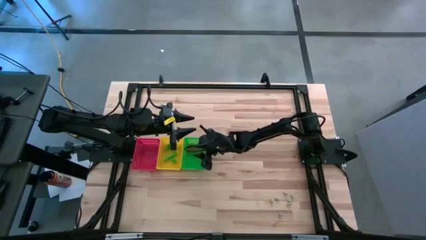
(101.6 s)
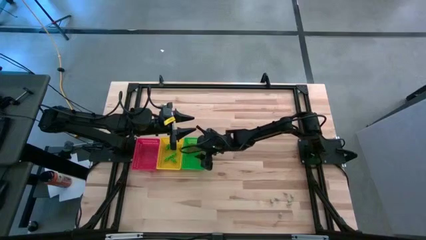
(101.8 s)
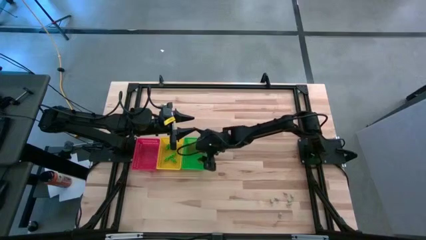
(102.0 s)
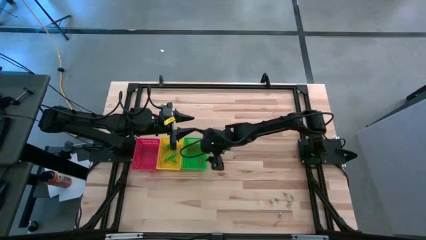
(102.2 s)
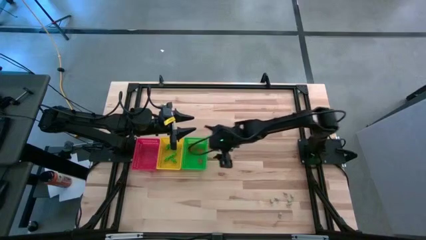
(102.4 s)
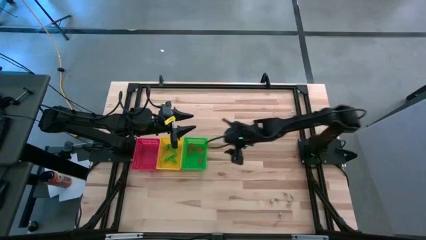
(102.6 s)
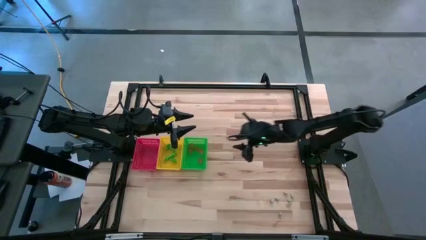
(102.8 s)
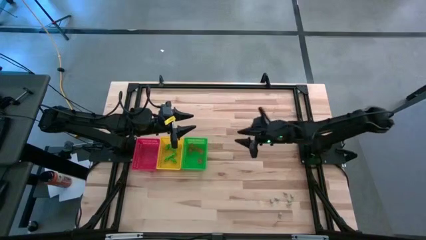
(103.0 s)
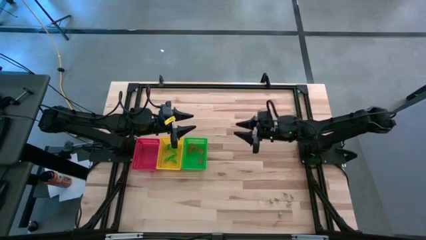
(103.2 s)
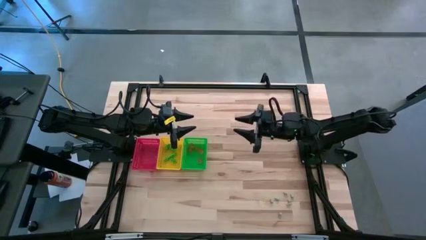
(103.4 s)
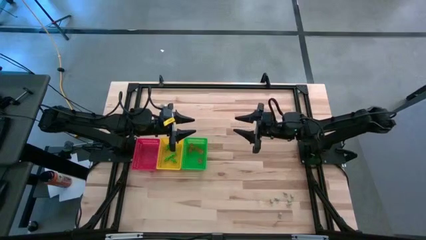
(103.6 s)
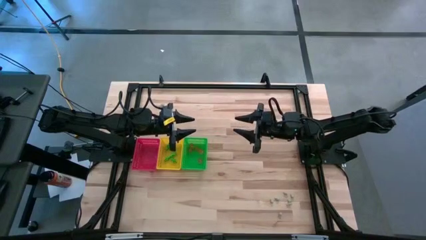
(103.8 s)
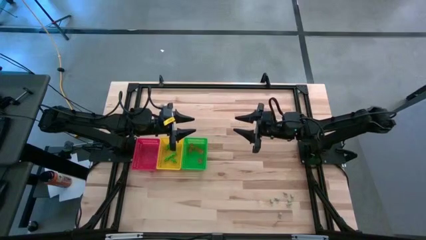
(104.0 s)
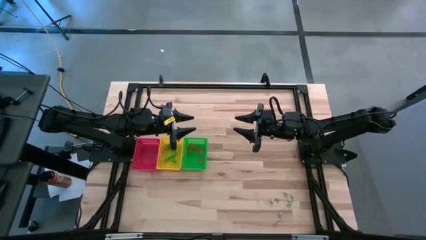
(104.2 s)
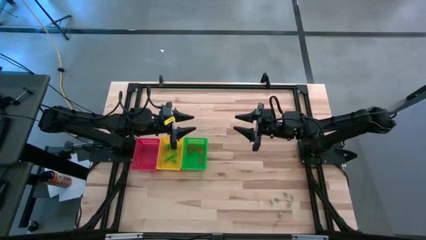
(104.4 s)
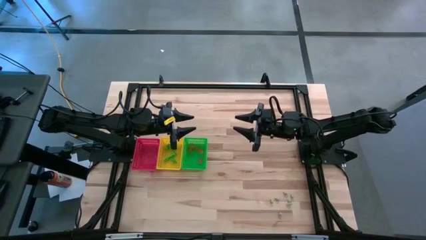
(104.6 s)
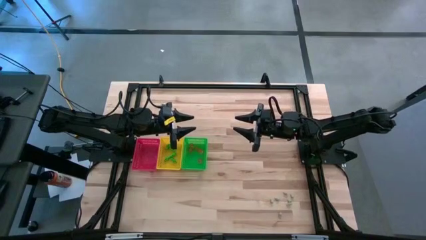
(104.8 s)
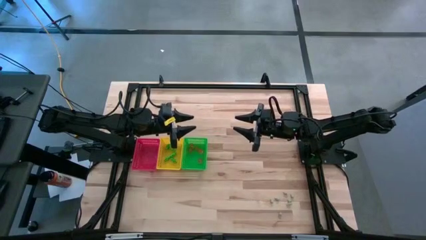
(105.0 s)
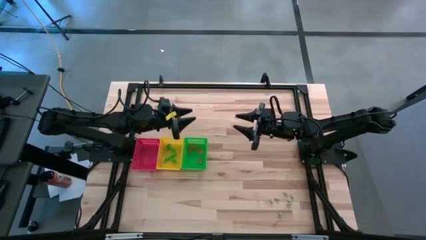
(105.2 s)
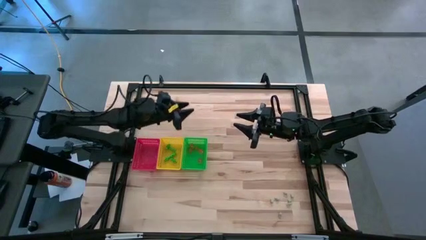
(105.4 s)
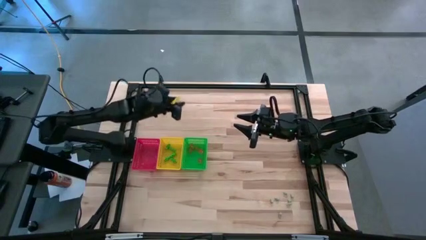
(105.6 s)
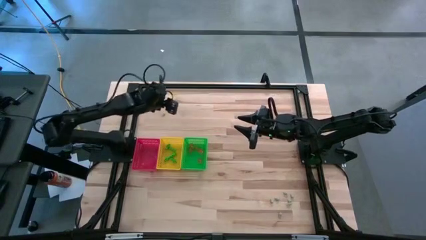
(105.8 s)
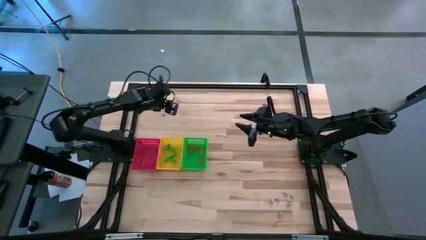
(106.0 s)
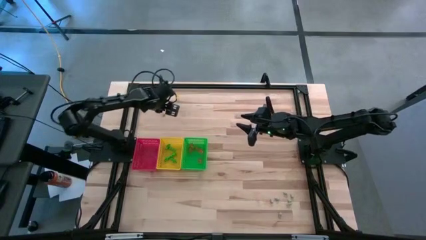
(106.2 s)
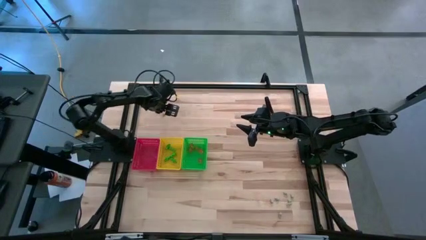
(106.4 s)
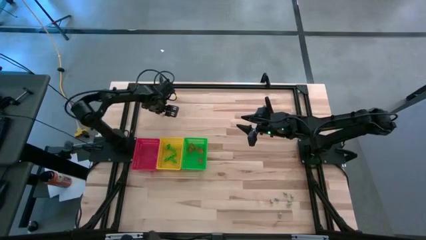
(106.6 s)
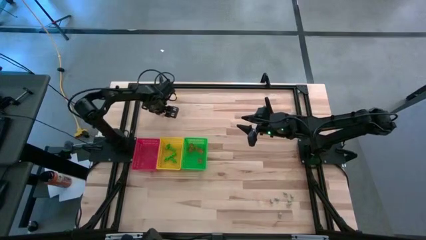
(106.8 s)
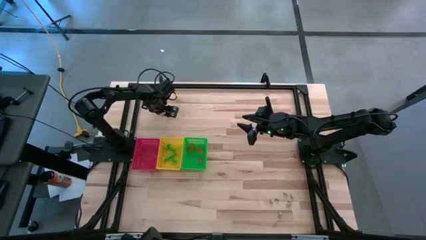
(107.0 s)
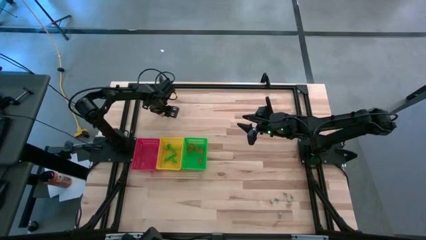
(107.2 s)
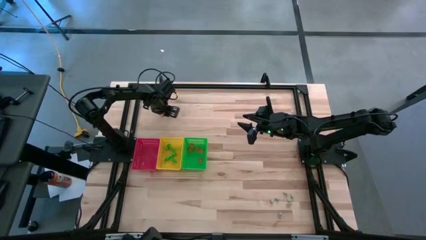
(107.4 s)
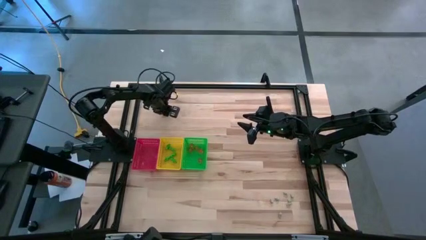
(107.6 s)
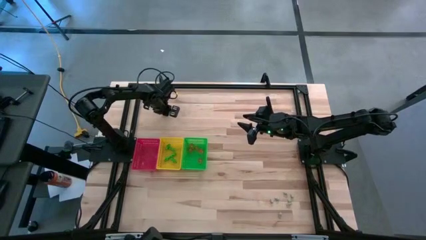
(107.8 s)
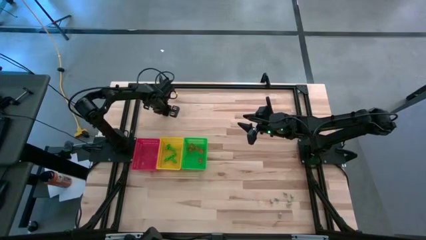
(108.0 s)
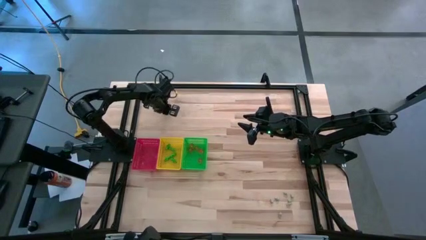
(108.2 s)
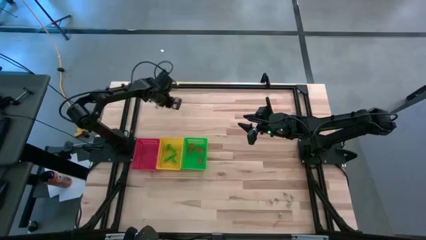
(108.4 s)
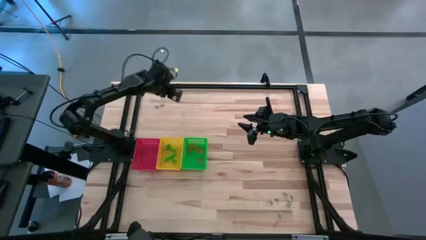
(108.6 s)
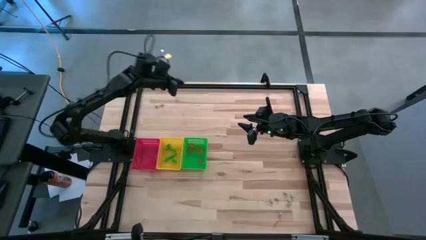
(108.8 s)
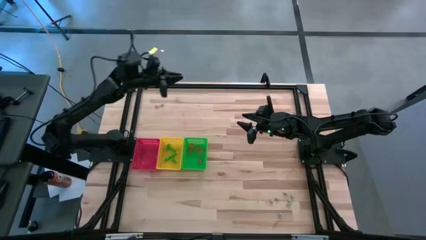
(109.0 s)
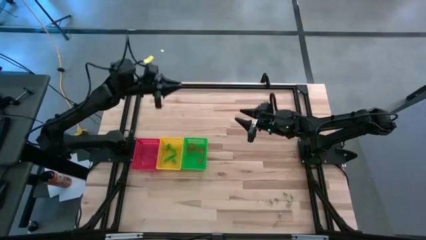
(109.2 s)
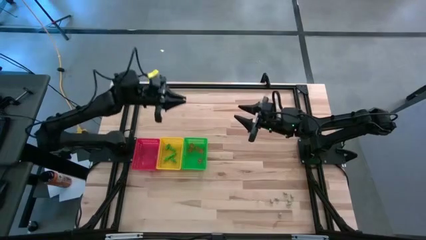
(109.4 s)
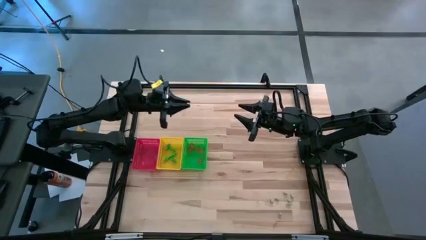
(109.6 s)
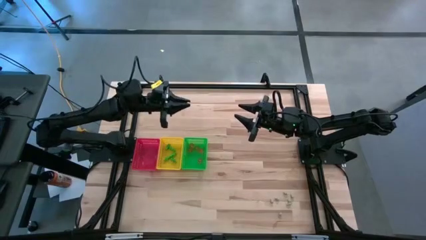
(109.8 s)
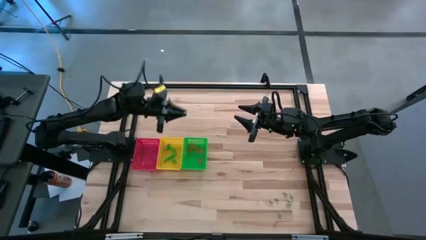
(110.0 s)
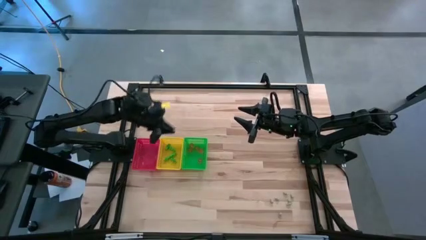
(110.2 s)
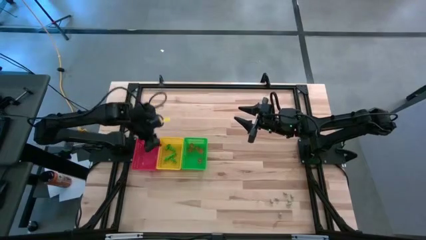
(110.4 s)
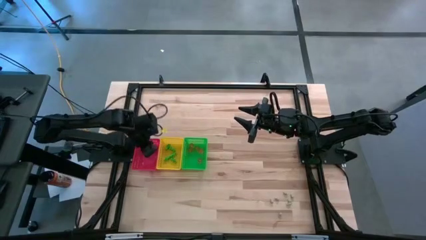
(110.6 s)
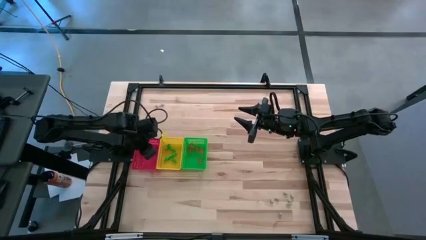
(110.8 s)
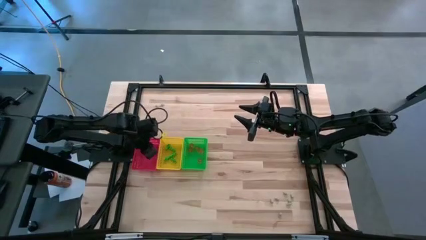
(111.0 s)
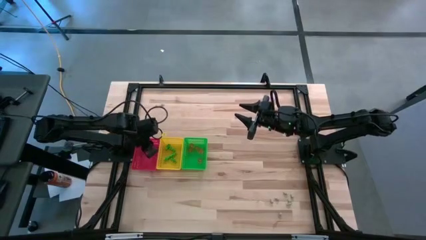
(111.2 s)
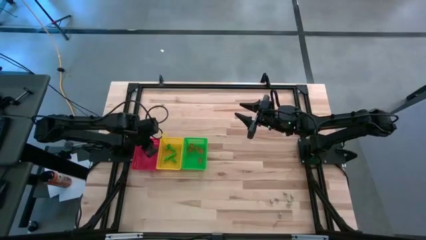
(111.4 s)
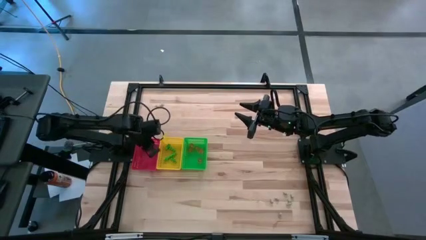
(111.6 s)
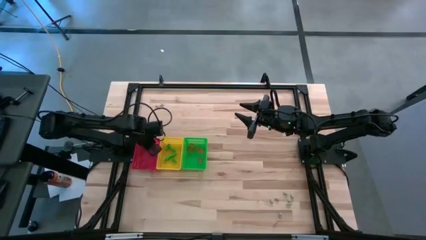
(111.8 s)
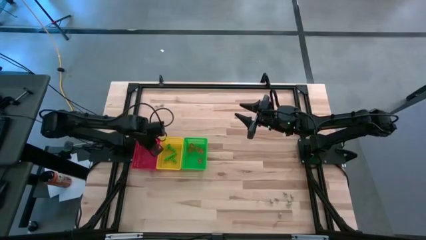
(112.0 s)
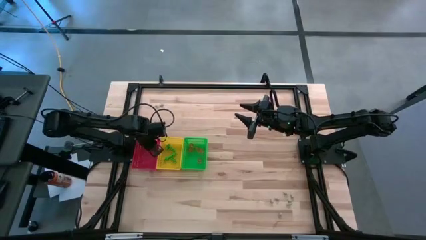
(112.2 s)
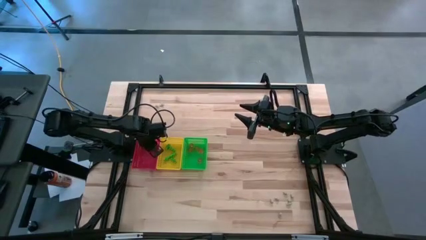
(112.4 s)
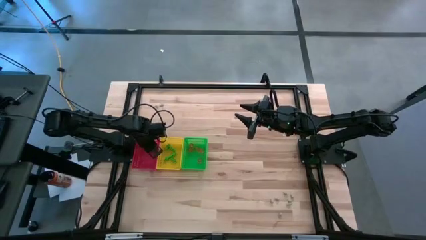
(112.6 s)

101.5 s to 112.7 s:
Task: Sort Halloween decoration
Put the white skull toy into the red bin

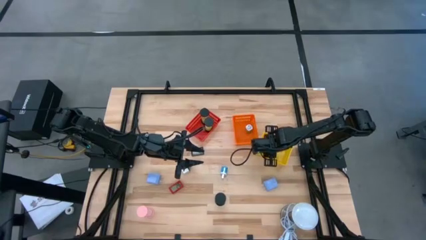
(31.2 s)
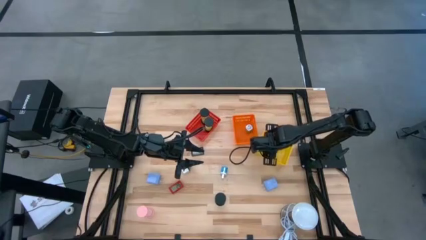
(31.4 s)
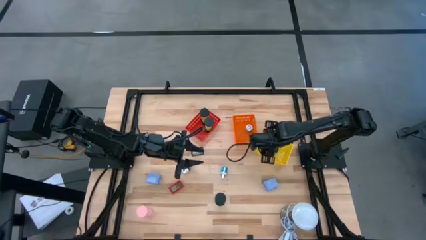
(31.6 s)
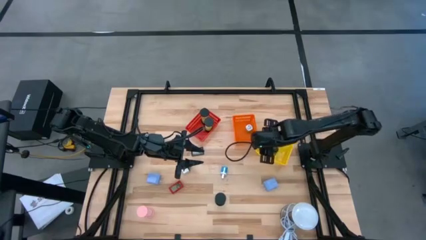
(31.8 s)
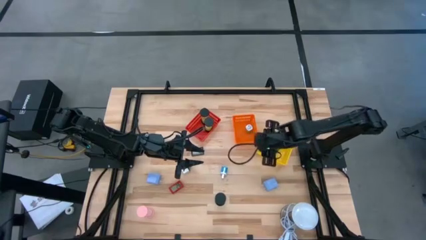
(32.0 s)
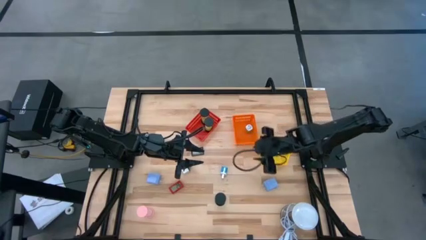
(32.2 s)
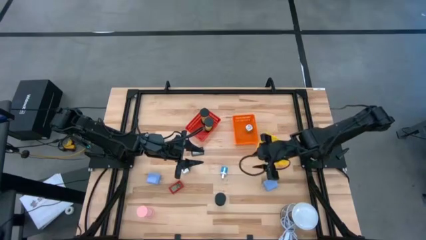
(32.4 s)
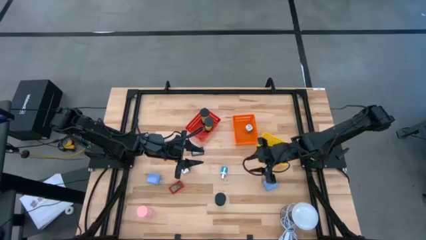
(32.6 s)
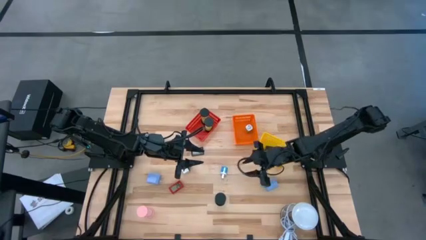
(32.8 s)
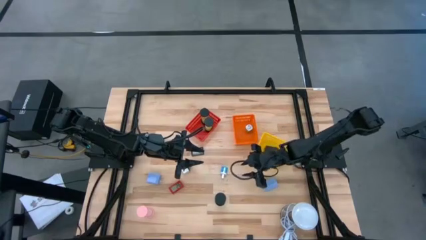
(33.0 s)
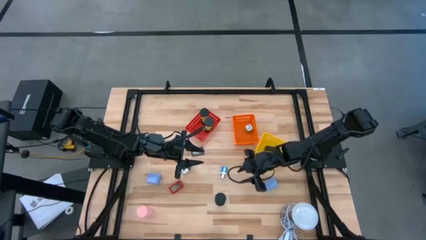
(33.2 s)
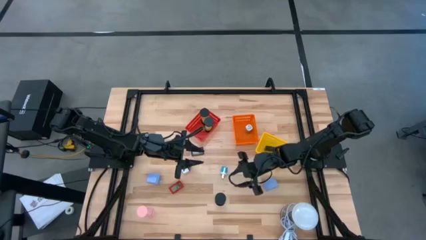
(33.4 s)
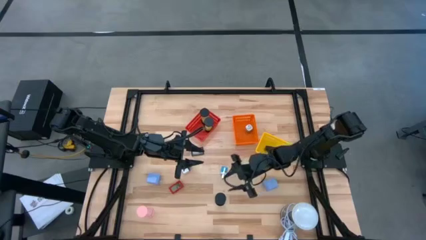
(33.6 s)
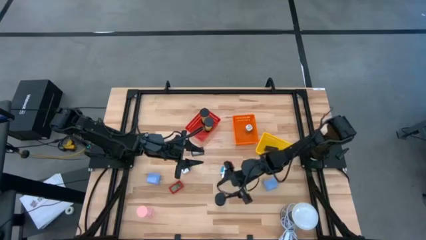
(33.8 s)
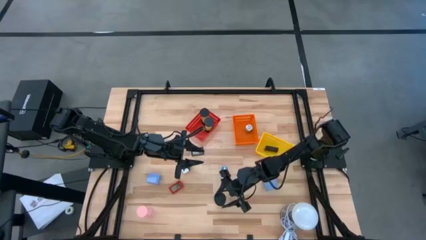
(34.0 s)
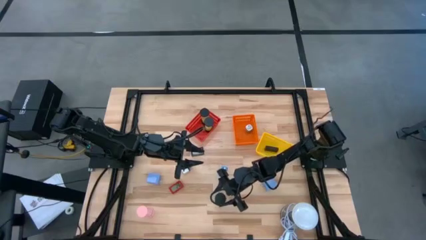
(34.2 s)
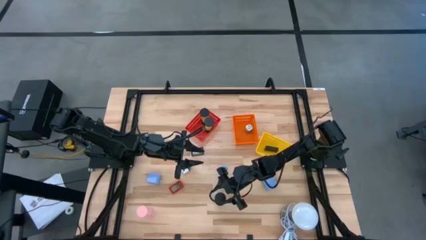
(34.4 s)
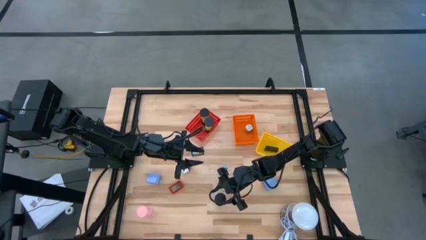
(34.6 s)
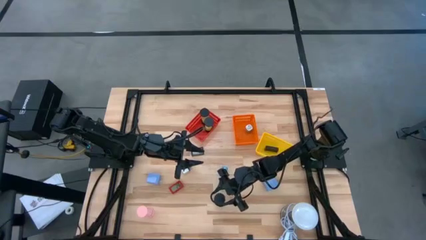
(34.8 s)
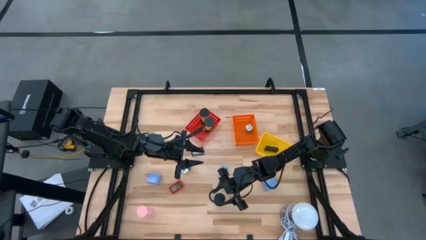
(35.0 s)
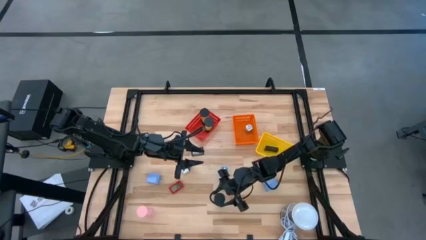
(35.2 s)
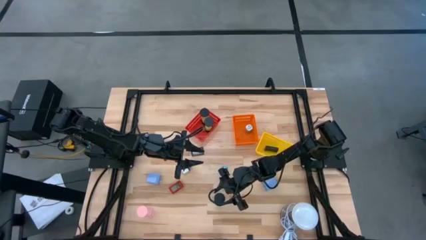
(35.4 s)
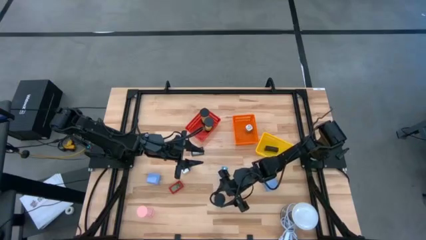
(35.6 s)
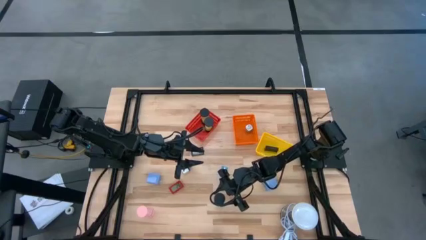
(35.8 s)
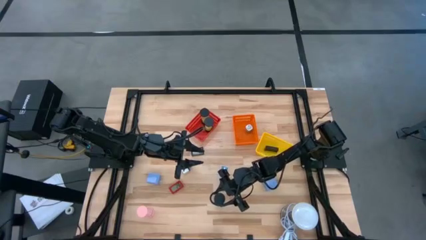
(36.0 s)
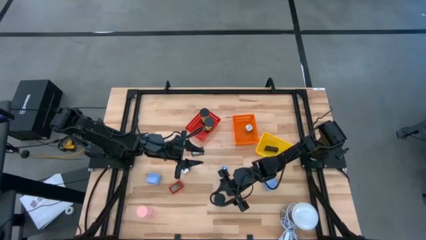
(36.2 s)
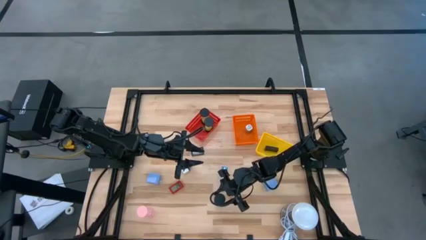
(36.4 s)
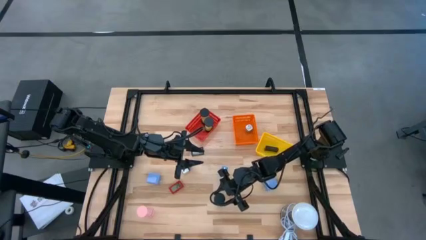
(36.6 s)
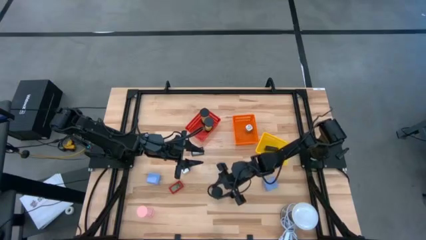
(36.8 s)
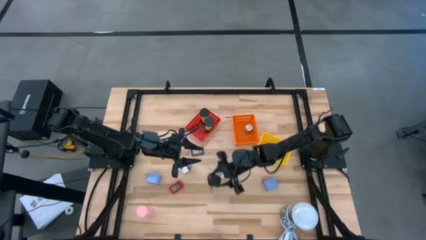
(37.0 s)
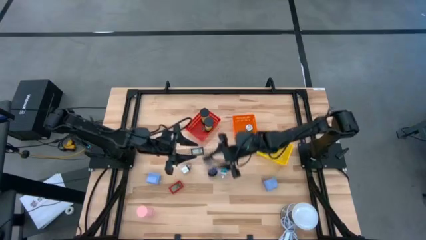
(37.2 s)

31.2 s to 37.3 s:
Task: Pick & Place Office items
Put the blue hourglass into the red bin
